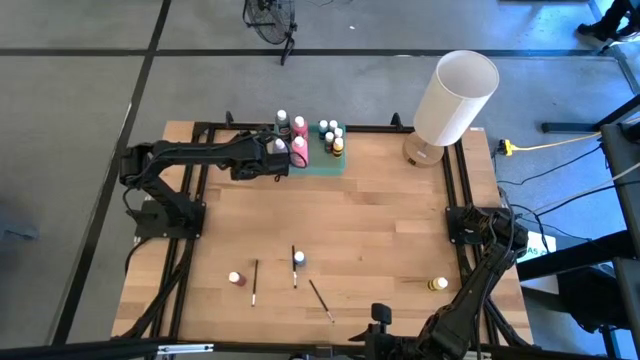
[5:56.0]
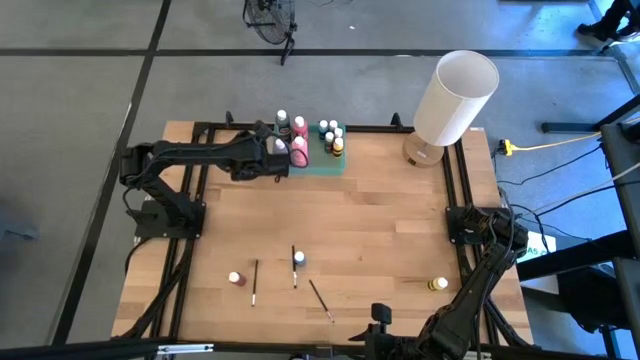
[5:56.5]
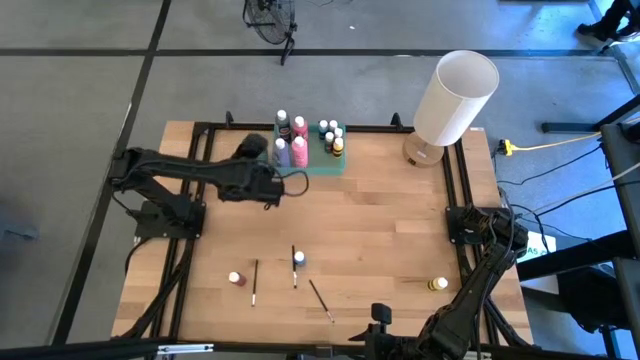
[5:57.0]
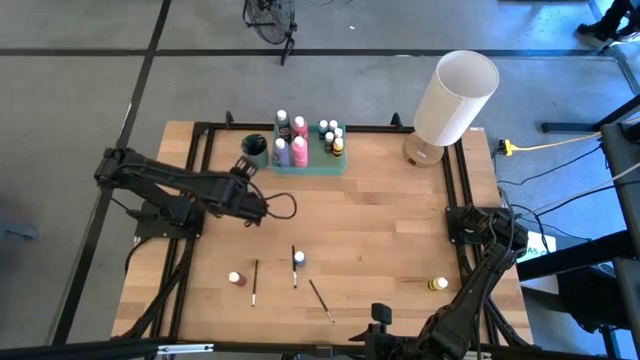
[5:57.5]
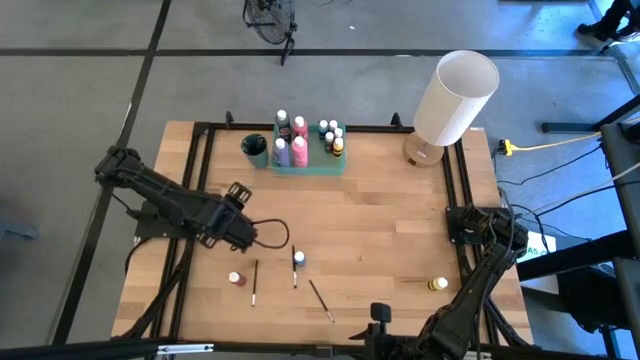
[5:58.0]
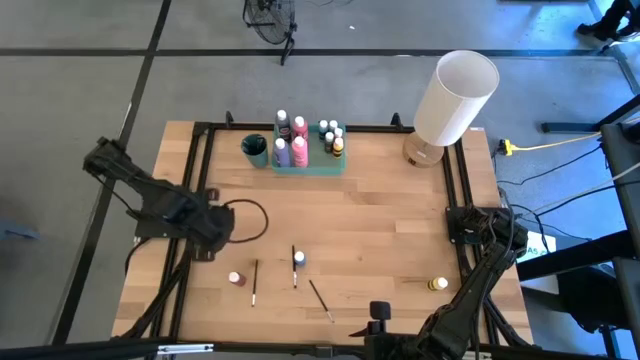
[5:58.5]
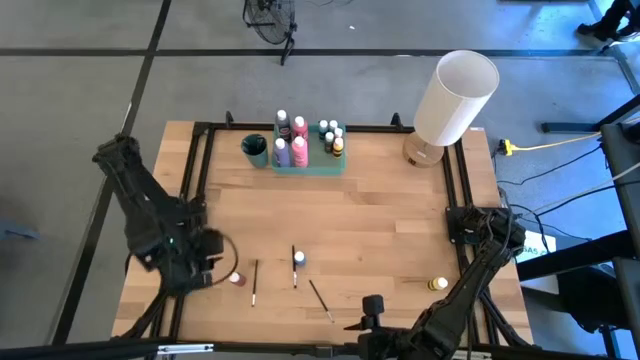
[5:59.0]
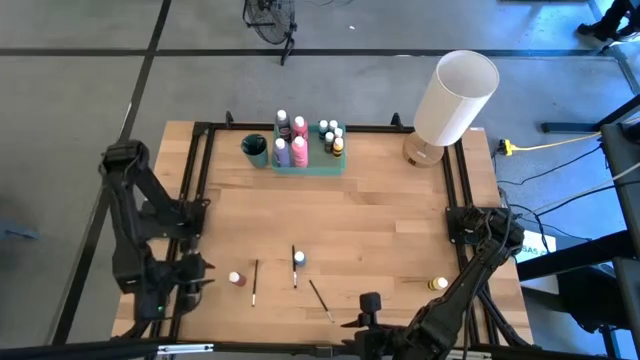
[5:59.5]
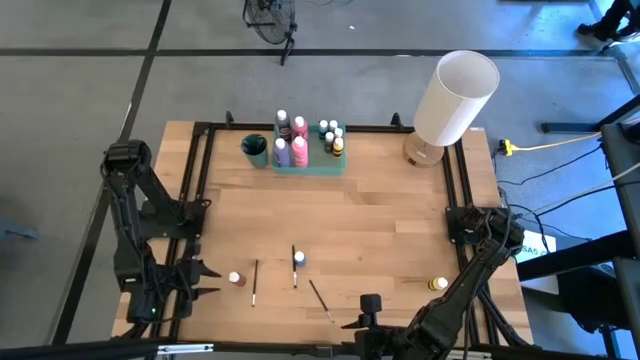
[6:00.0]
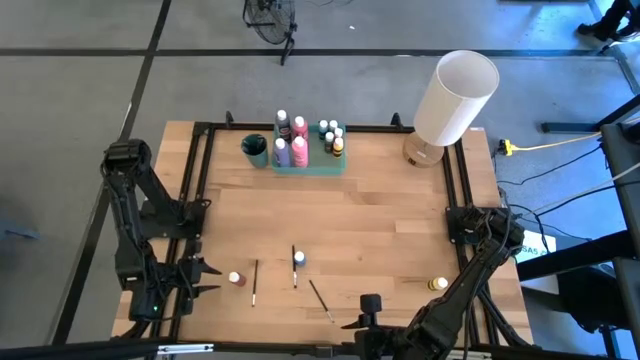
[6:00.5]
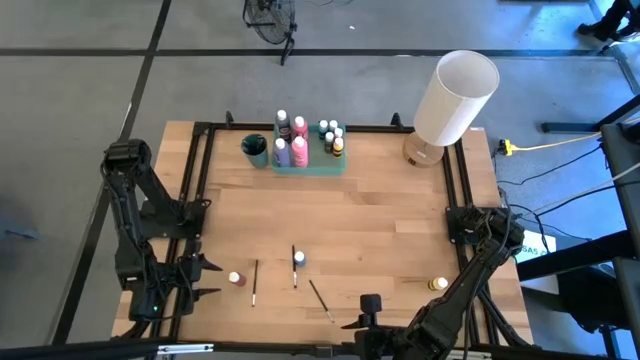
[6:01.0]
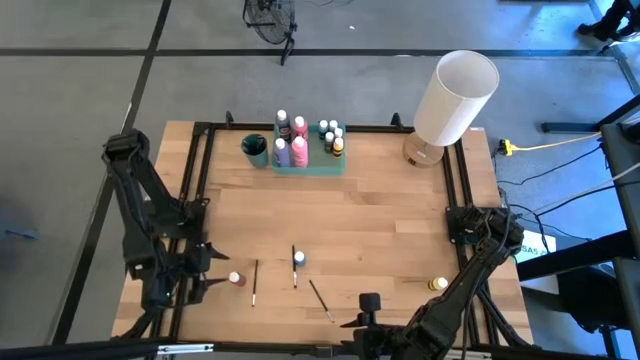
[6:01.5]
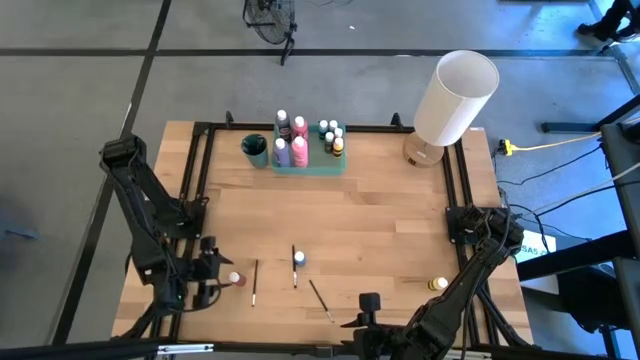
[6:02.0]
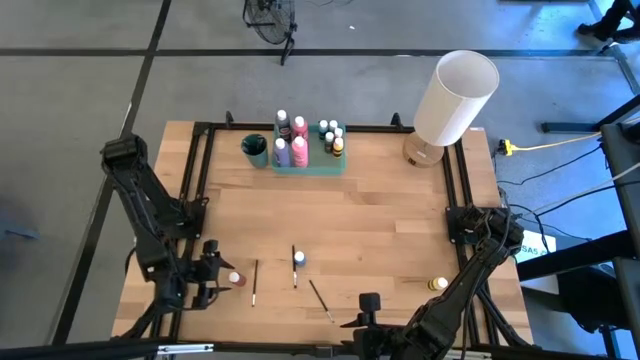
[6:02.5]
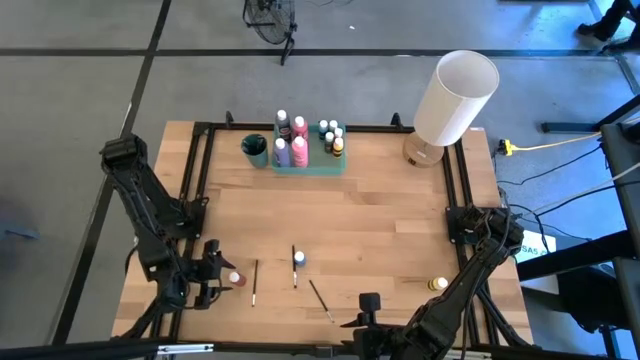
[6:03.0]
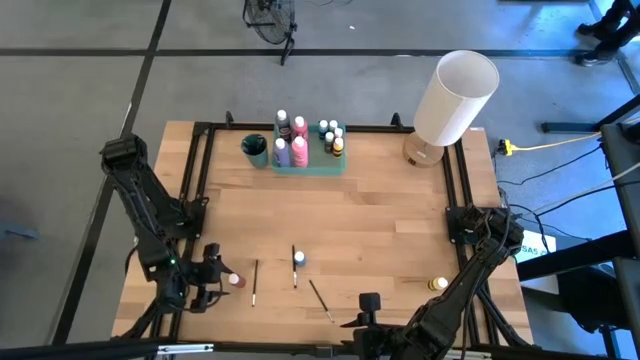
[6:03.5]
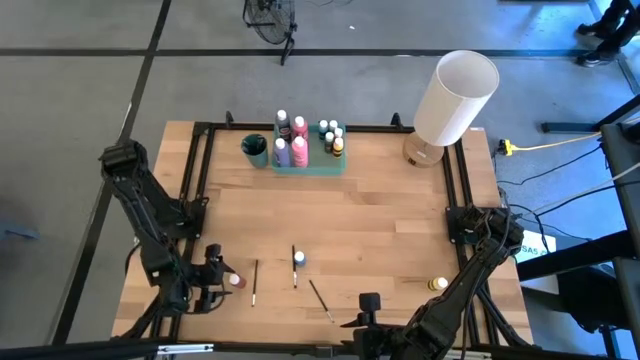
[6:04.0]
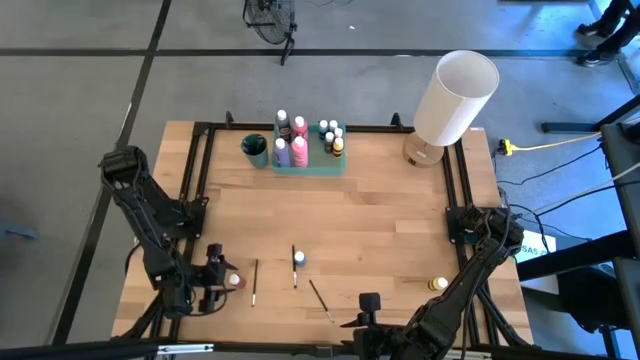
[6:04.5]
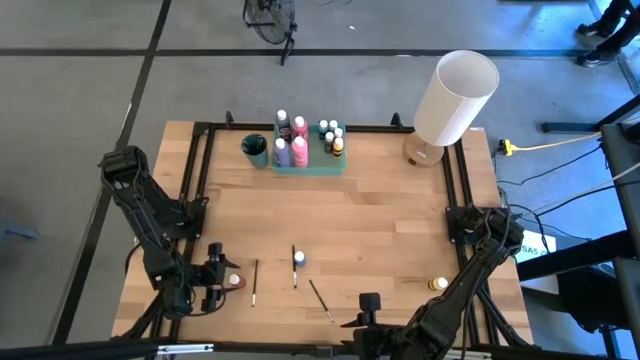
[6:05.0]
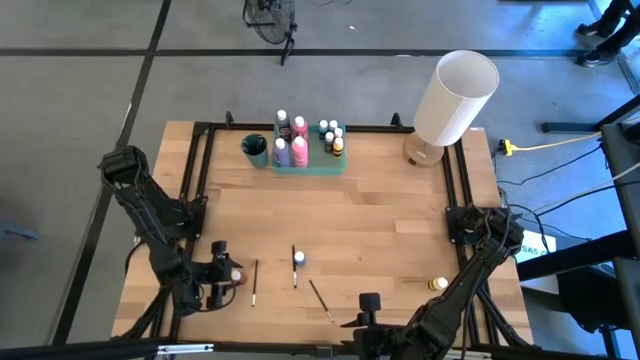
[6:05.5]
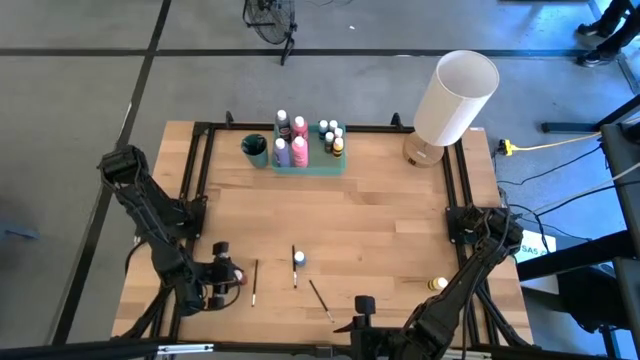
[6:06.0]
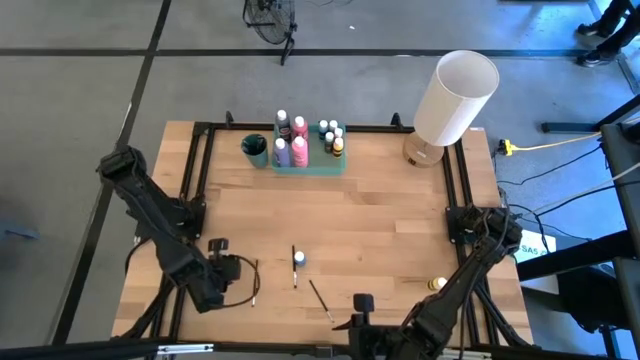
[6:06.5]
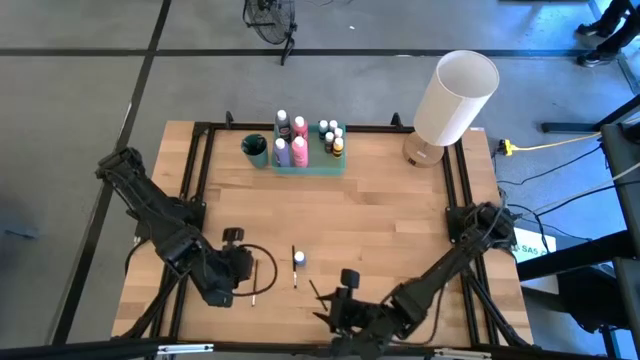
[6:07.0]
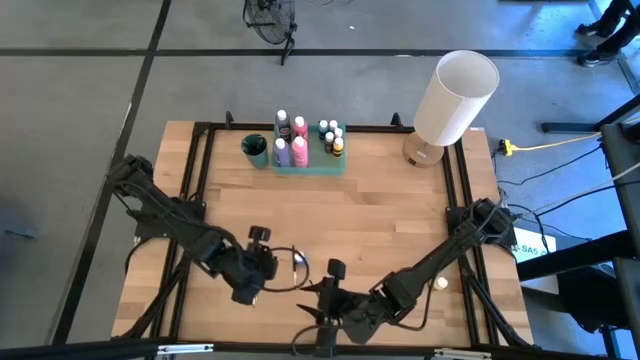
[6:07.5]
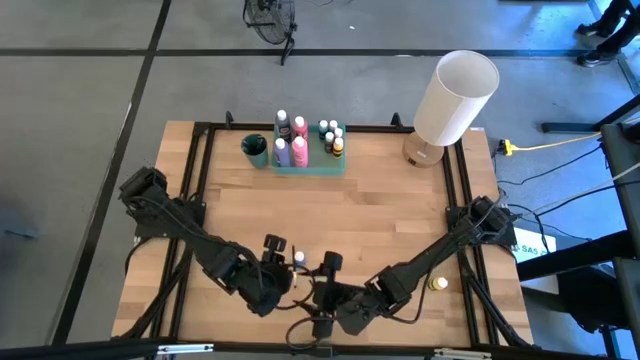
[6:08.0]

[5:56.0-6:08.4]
Task: Pick & Place Paint Supplies
Put the small red paint bottle into the green bin

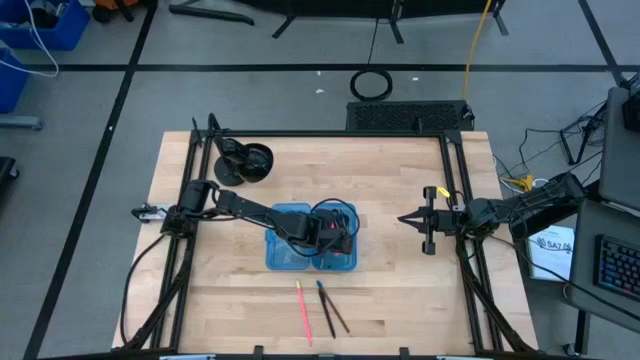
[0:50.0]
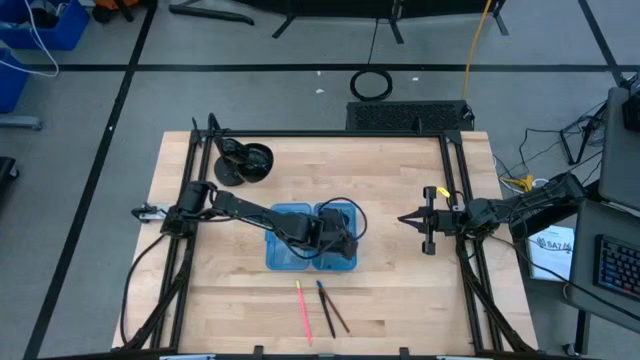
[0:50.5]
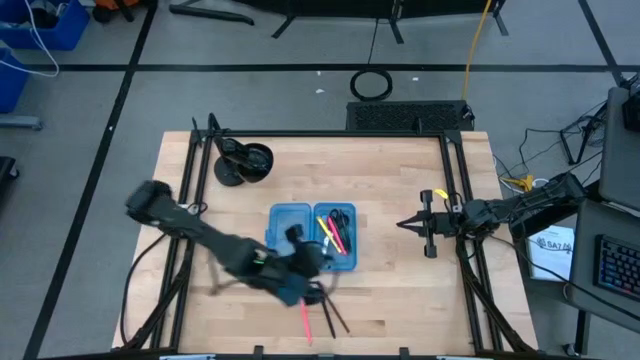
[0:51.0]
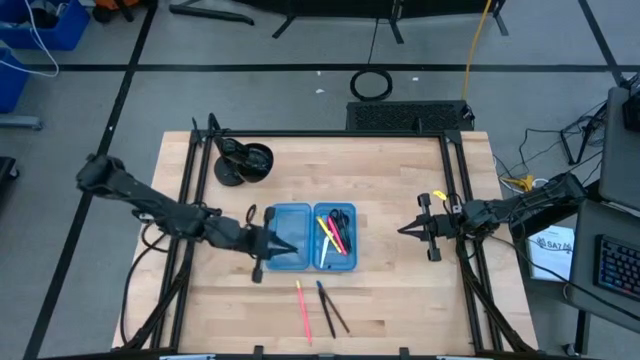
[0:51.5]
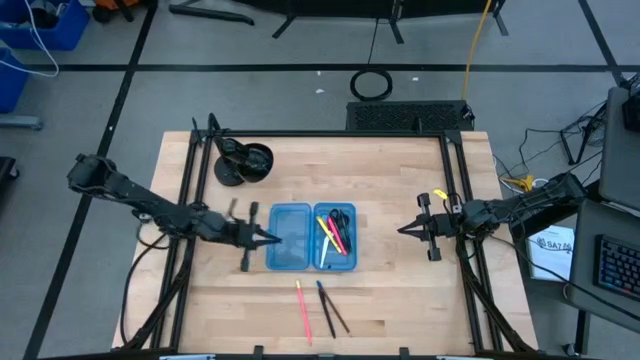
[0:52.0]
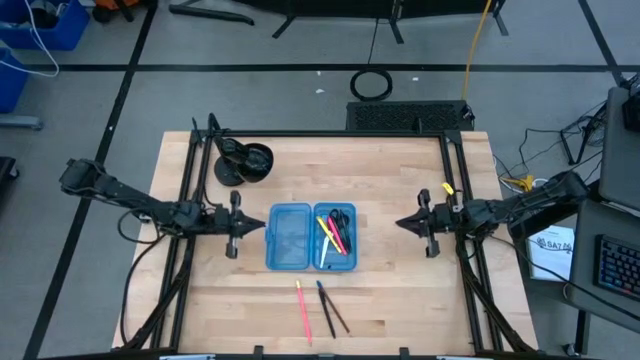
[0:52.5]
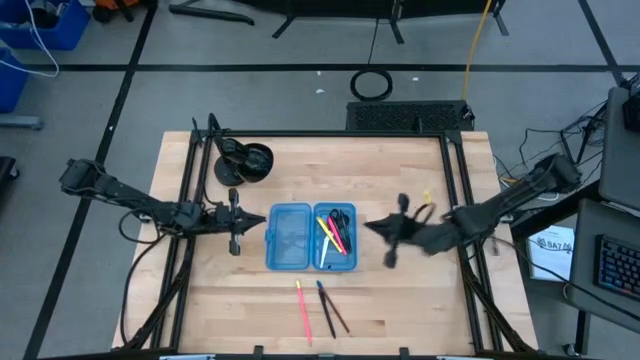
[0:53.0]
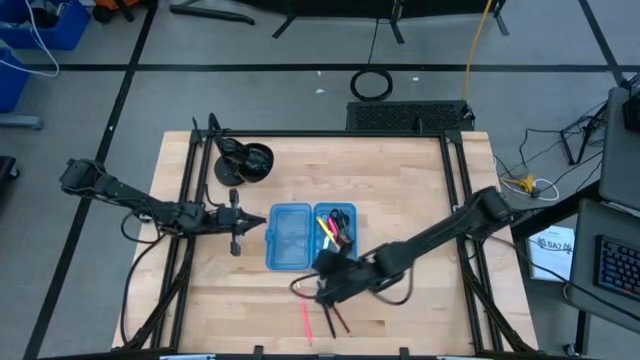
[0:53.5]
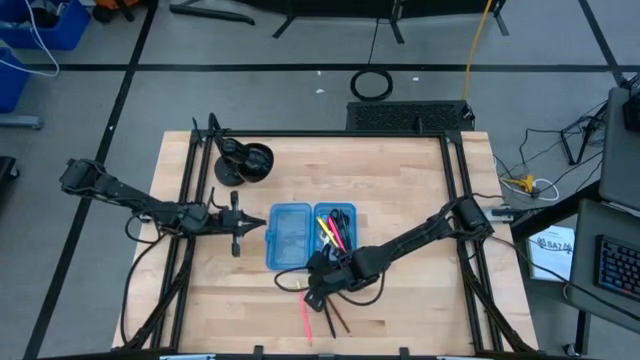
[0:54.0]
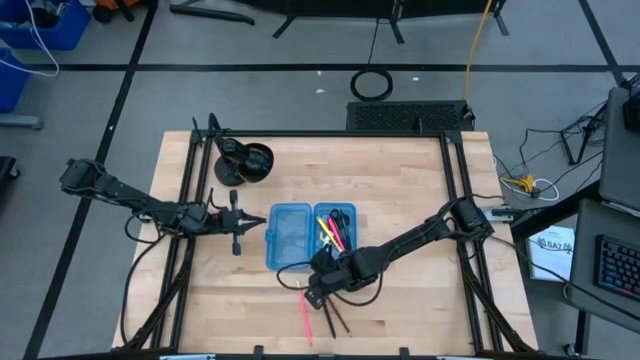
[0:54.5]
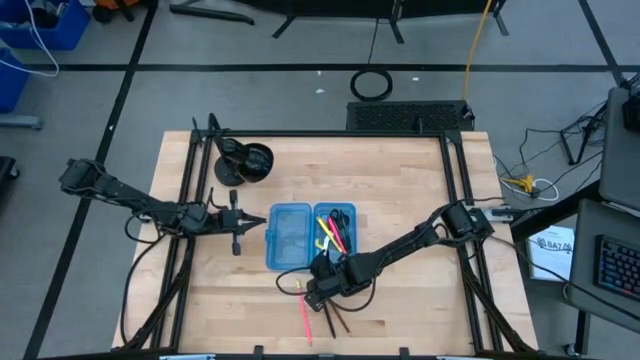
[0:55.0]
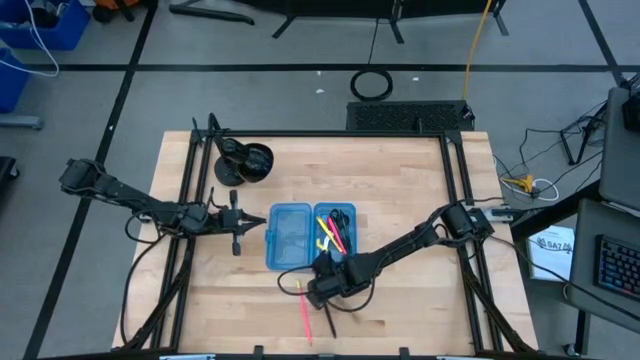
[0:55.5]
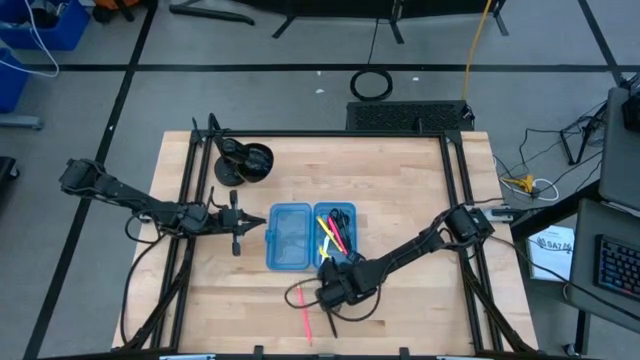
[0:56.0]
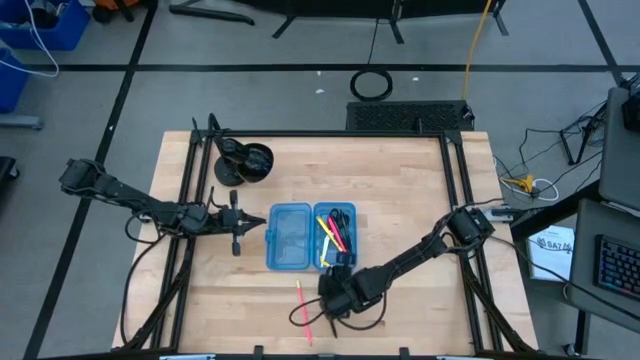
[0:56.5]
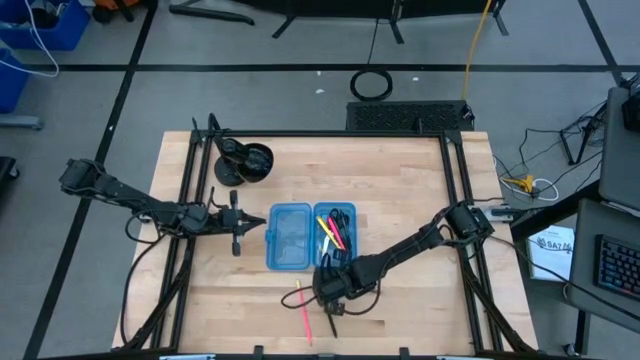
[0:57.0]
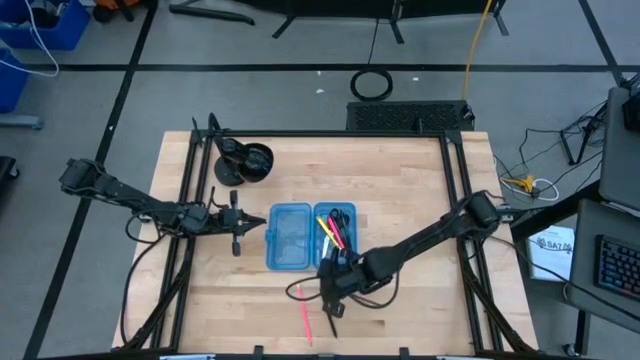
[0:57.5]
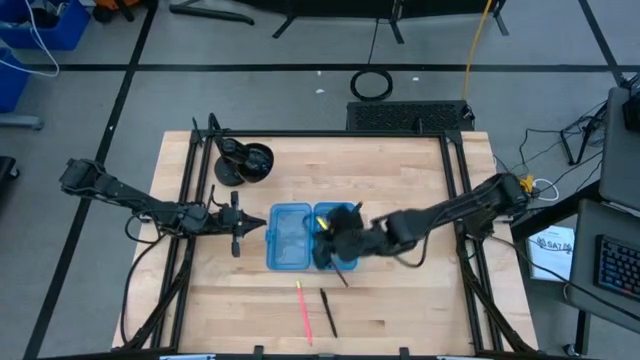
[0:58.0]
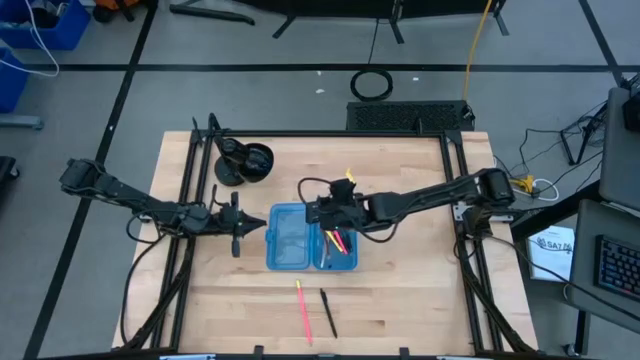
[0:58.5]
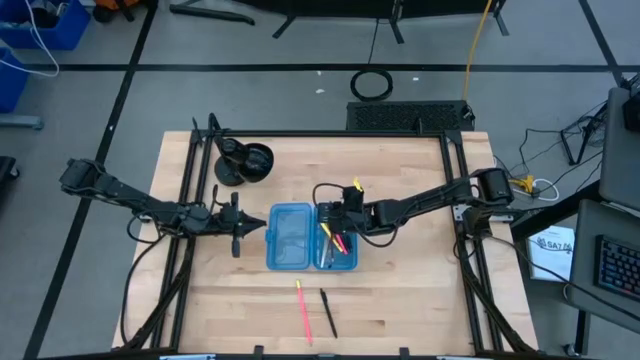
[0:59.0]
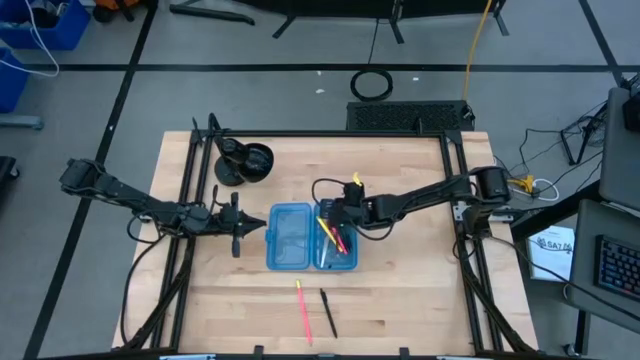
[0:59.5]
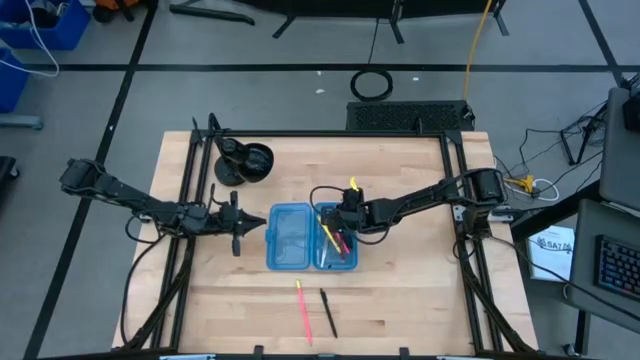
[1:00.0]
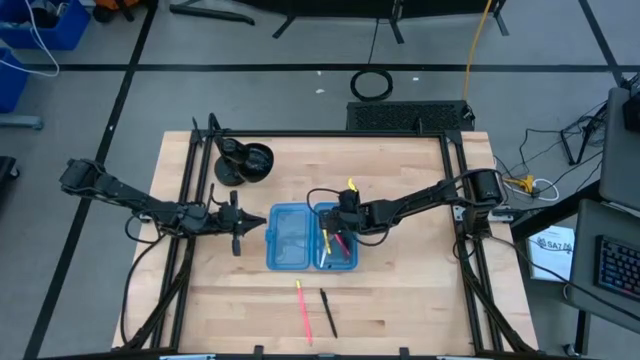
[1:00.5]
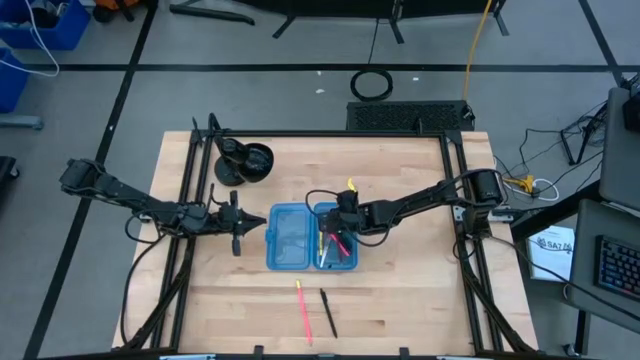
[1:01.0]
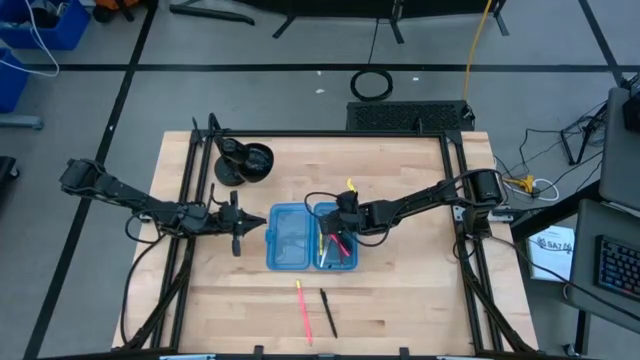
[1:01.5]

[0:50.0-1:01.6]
Task: Pick & place school supplies into a supply box
Put the brown pencil into the blue supply box
